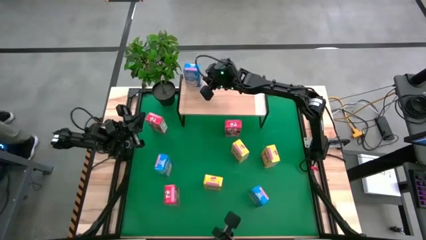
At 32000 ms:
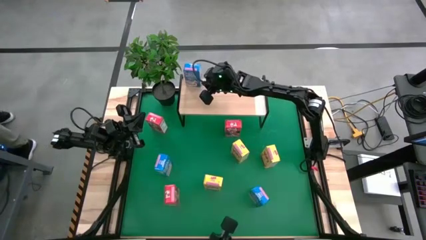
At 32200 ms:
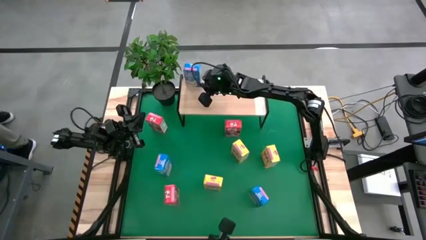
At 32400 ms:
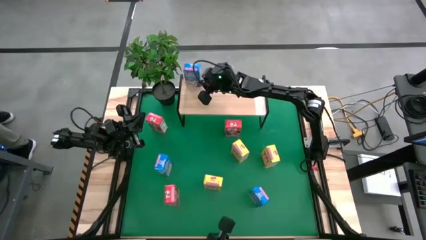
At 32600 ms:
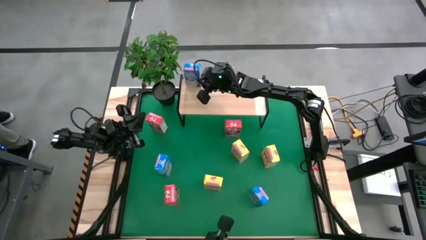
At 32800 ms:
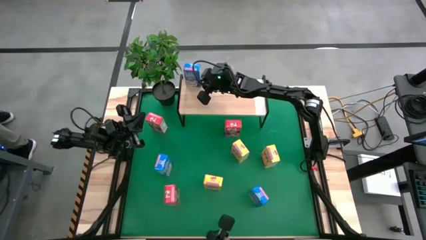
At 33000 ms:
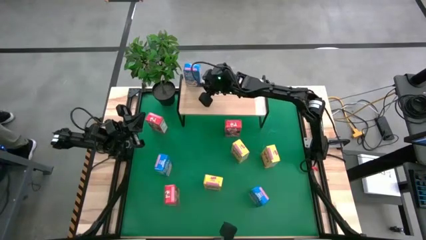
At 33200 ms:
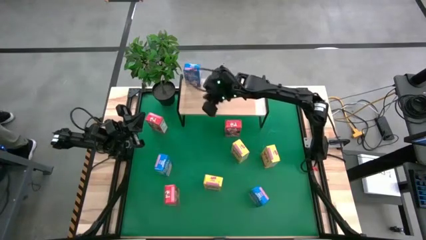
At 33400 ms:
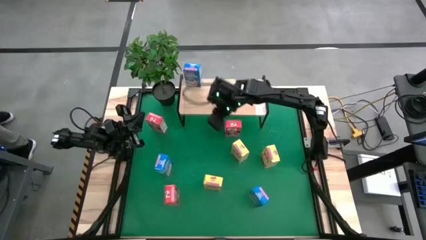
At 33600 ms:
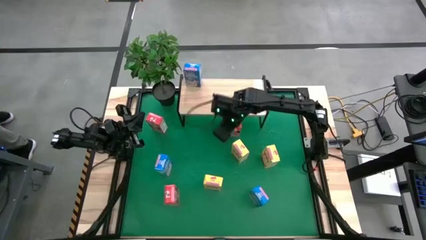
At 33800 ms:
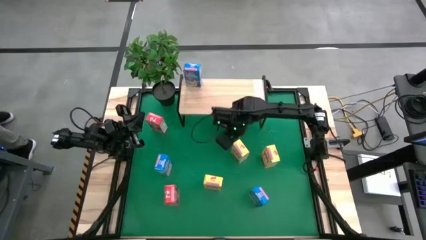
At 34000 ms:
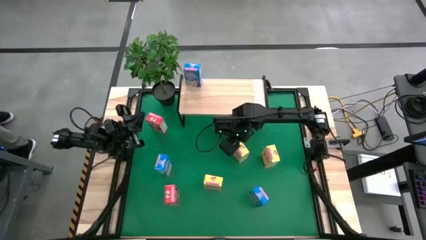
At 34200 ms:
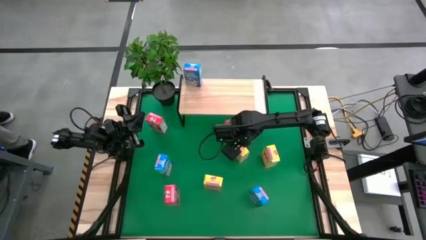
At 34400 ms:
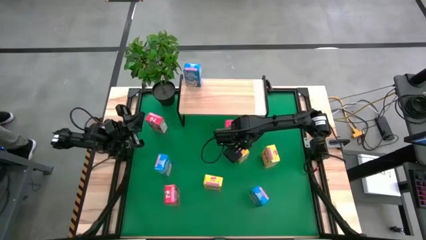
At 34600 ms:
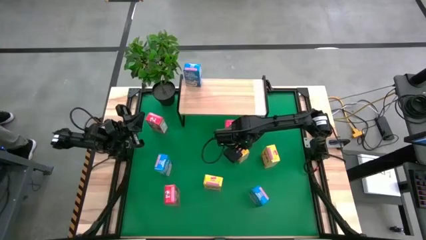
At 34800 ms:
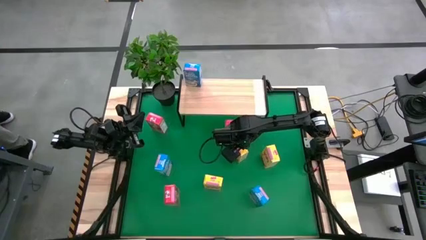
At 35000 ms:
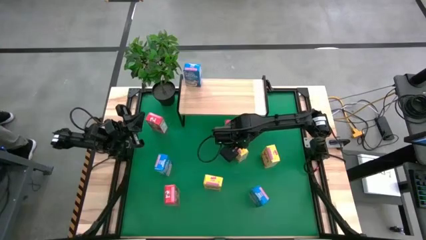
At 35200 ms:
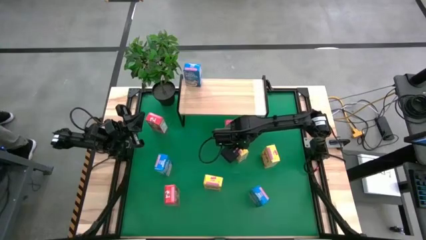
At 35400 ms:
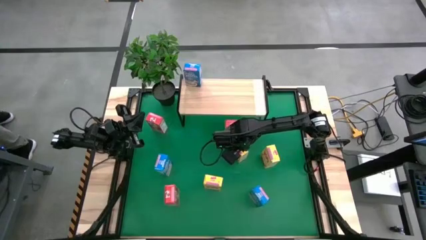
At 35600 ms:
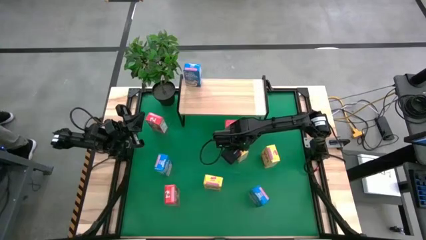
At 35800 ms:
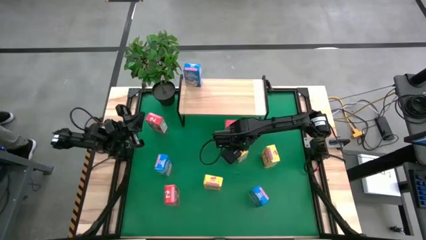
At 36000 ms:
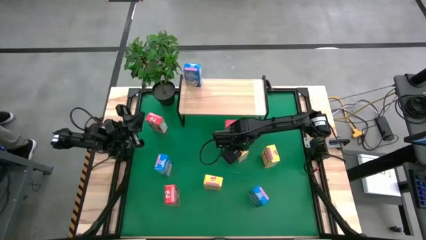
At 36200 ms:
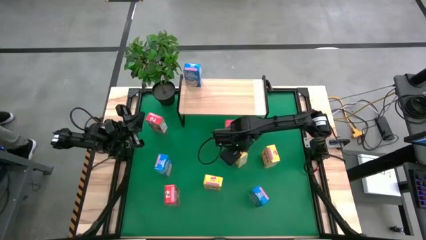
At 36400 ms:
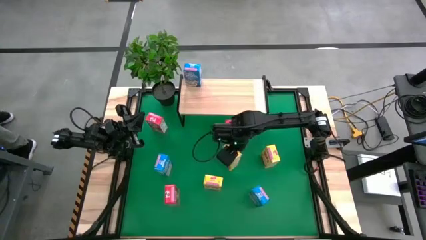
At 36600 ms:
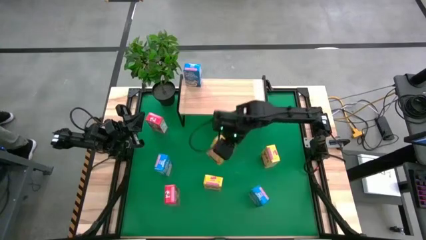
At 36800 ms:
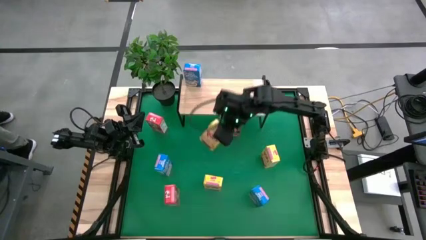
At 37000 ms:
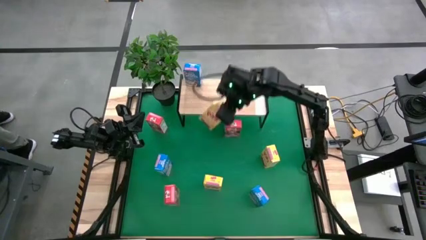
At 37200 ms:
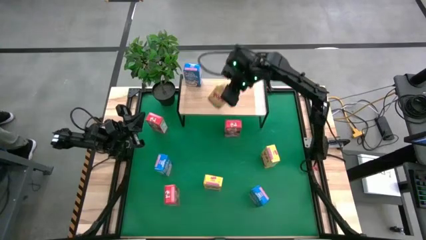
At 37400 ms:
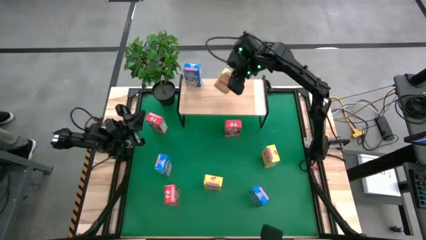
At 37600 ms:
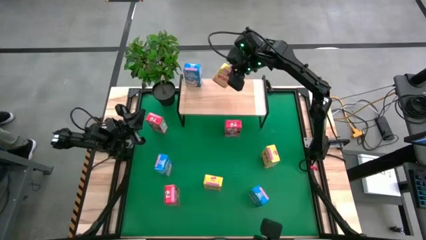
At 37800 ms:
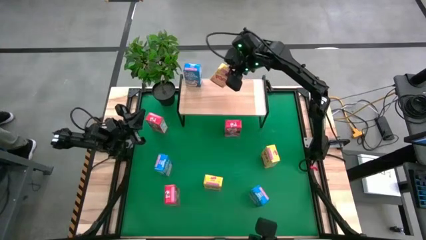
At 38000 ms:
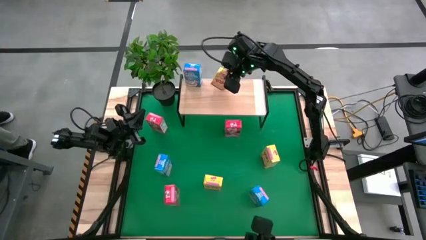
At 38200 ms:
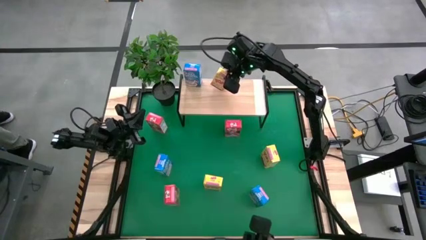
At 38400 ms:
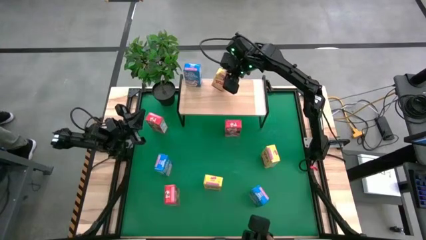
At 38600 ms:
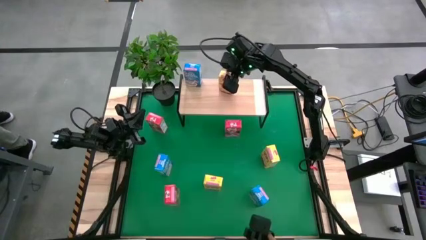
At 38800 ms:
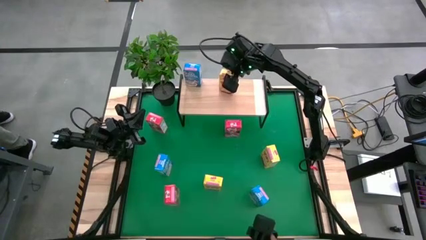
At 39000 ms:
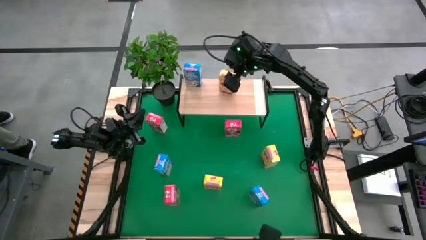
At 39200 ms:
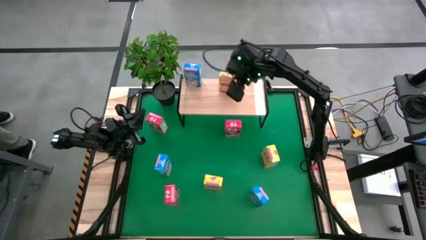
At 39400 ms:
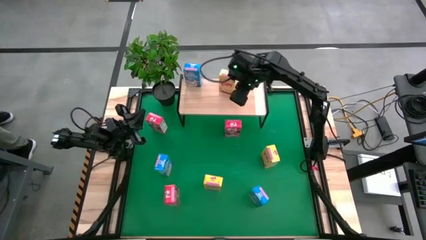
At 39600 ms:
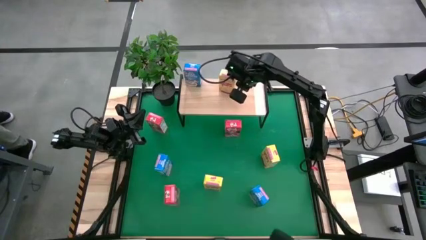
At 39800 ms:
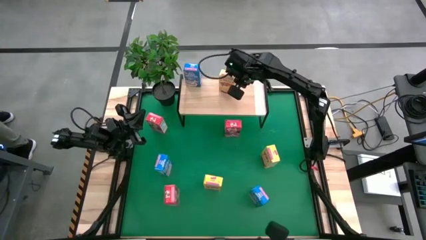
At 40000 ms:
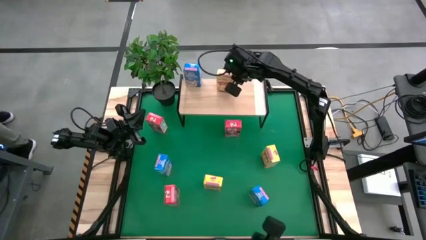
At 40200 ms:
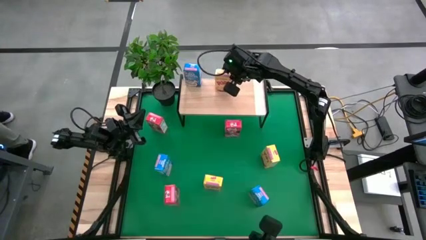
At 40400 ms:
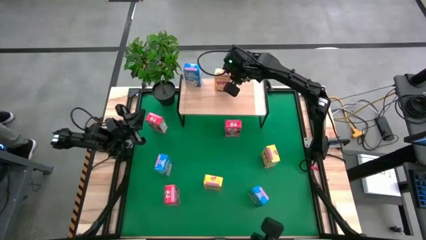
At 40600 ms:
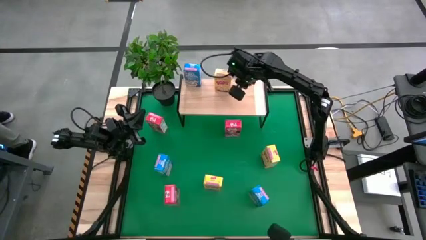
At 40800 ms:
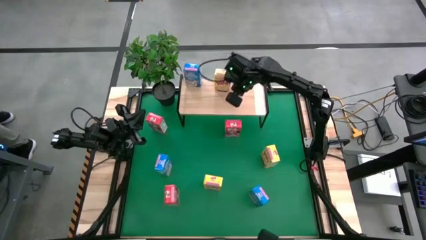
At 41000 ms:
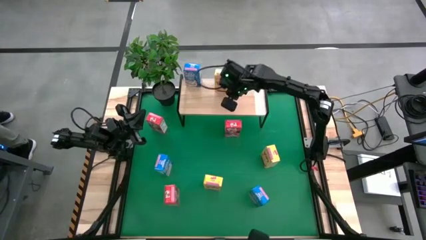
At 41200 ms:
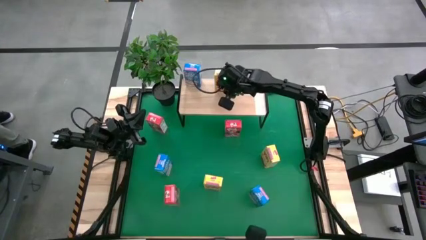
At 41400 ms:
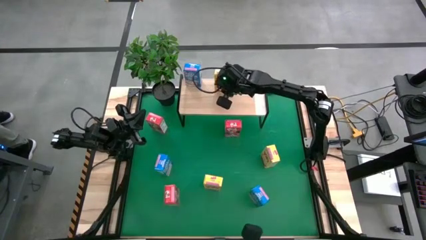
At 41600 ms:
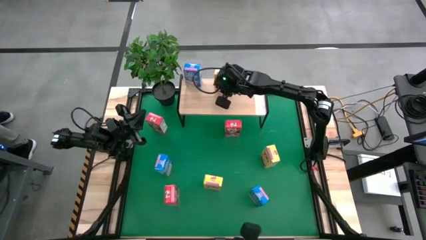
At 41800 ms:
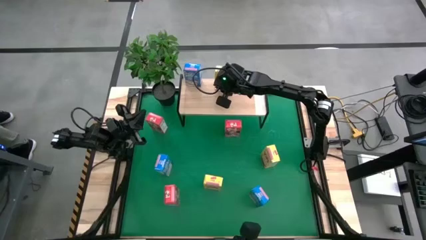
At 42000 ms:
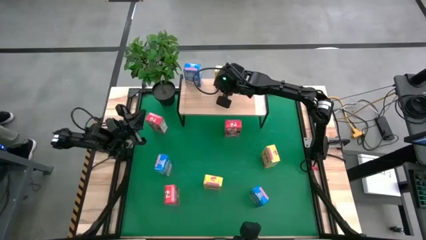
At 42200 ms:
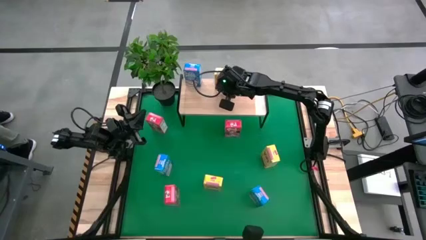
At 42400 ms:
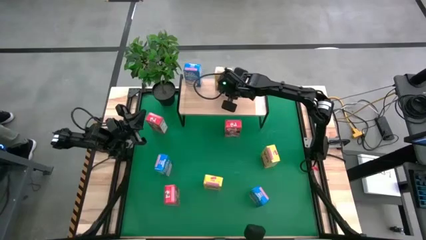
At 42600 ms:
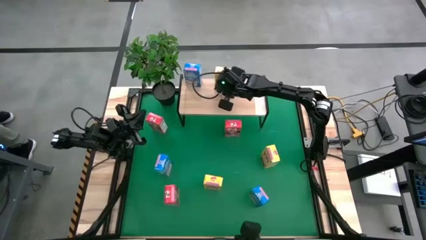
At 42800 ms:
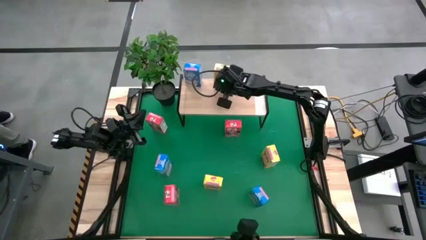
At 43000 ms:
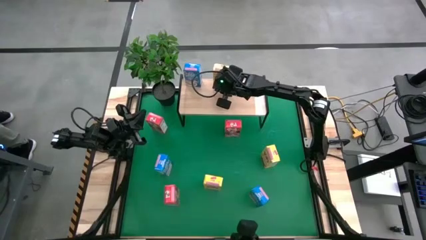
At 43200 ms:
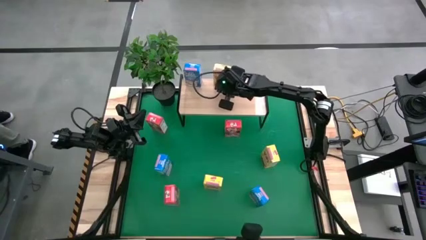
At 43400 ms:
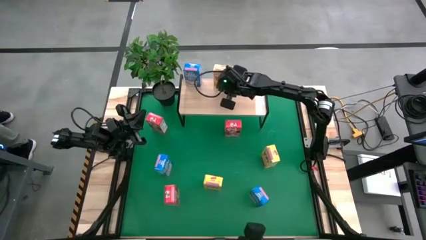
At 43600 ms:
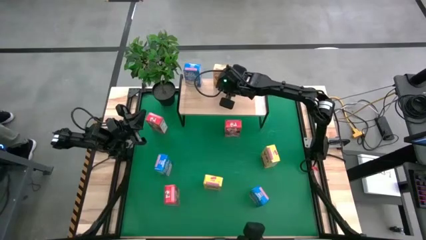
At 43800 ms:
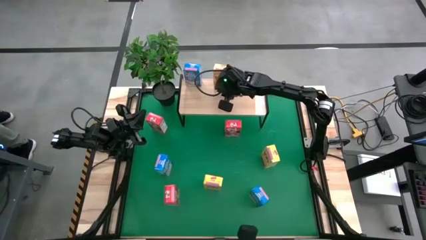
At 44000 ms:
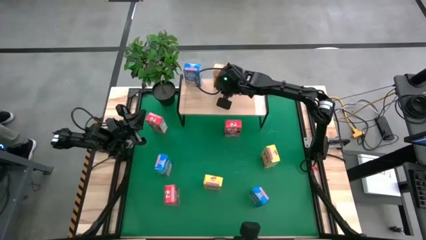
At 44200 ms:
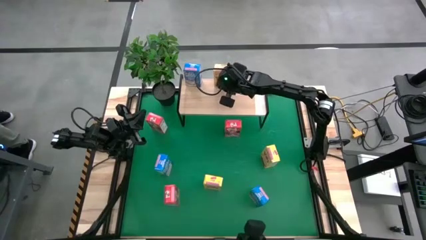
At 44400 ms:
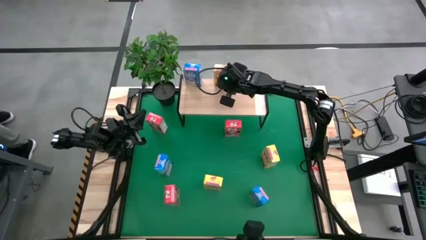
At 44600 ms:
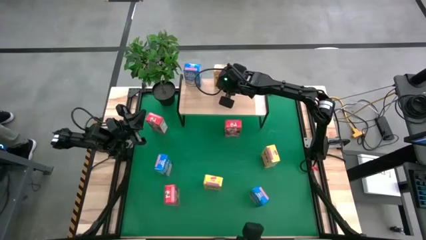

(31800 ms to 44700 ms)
Task: Stack cereal on shelf
Put the middle yellow cereal box on the shelf

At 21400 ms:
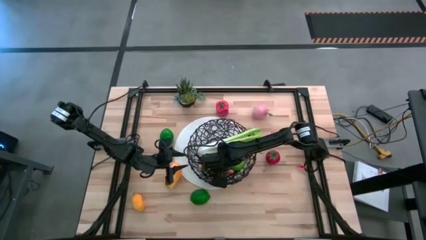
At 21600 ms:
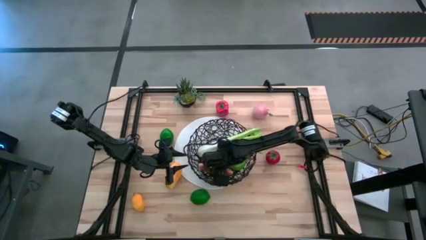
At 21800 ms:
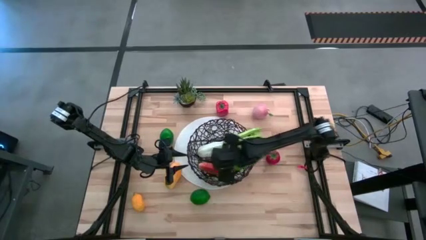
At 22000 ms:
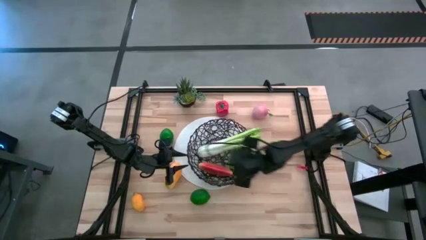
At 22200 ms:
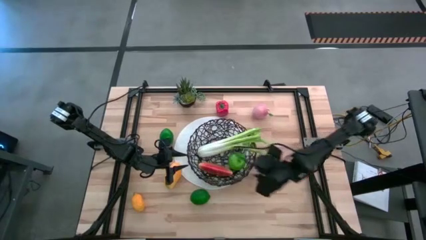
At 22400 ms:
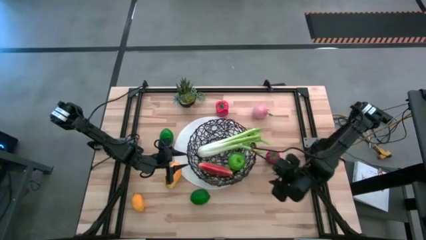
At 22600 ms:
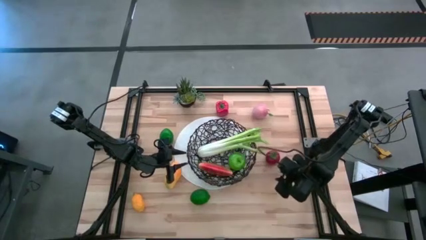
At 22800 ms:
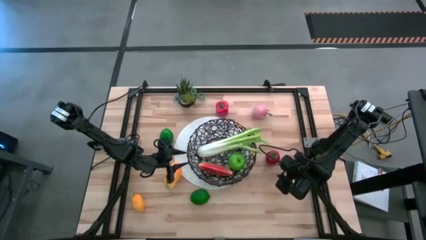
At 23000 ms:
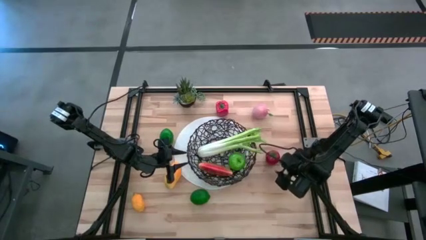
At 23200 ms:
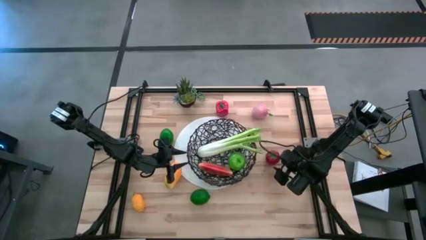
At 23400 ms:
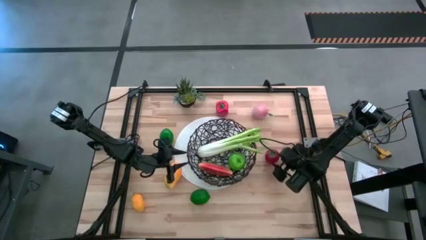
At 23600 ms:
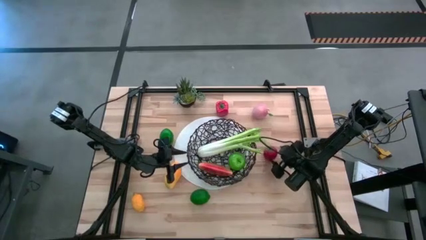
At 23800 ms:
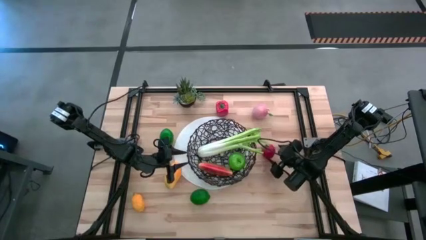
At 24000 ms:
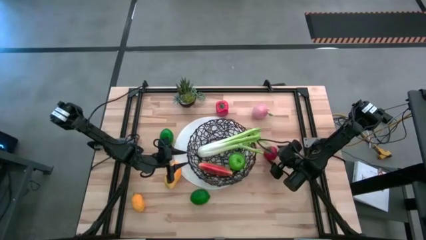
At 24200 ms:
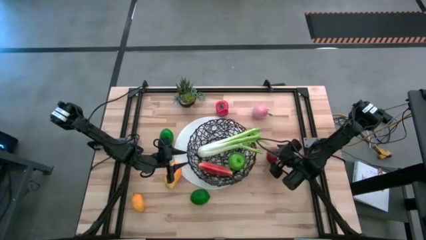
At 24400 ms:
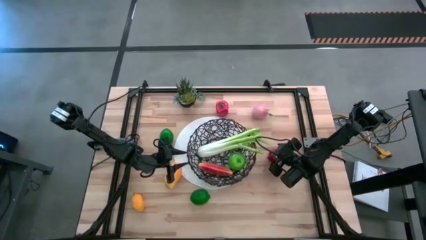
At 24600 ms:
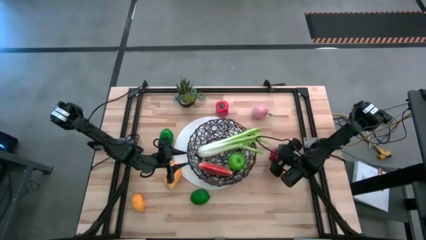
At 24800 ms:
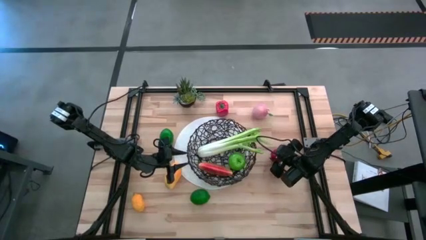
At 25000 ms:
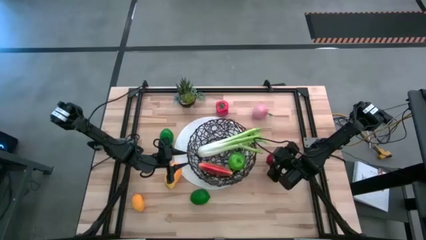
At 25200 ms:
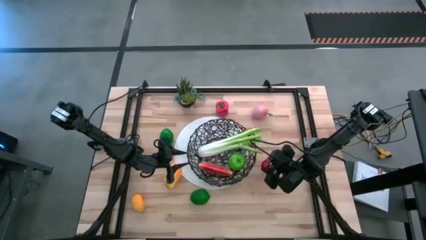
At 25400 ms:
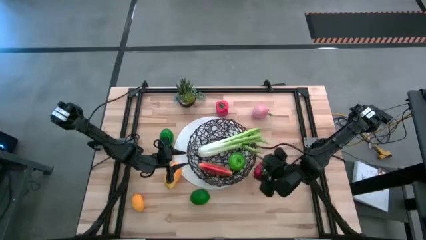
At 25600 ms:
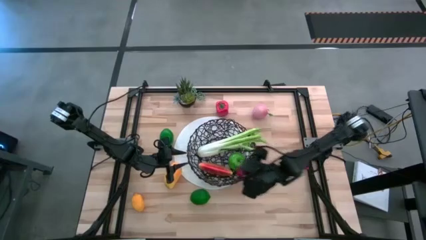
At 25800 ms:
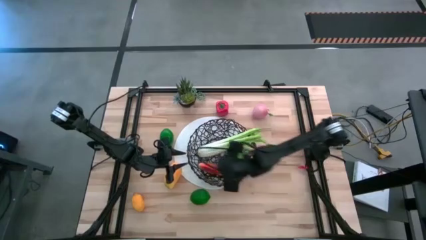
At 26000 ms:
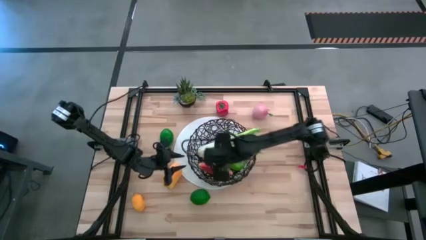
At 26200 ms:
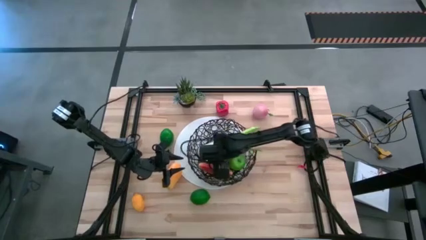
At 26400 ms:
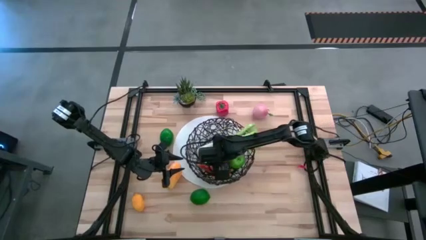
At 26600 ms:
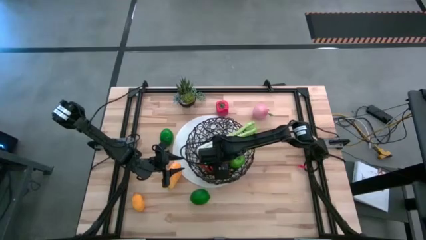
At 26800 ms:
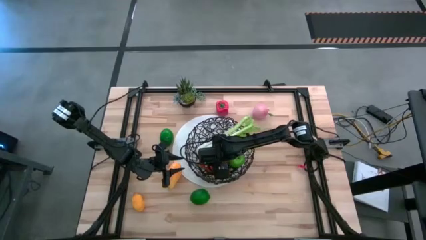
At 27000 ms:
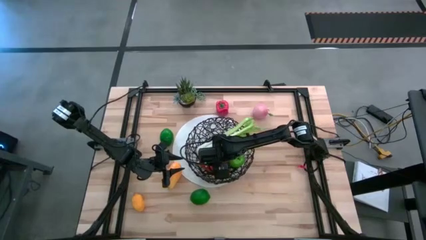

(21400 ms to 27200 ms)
Task: Build produce basket
Put the red tomato into the wire basket
